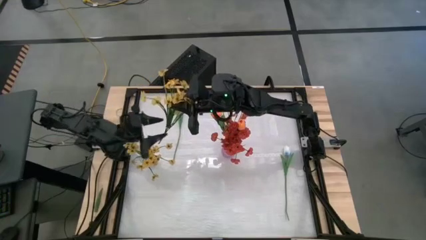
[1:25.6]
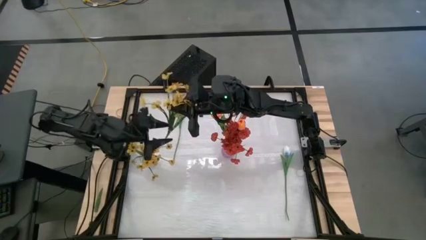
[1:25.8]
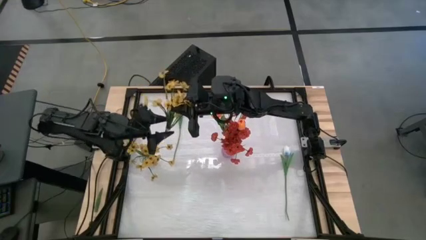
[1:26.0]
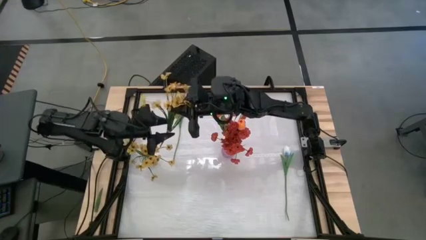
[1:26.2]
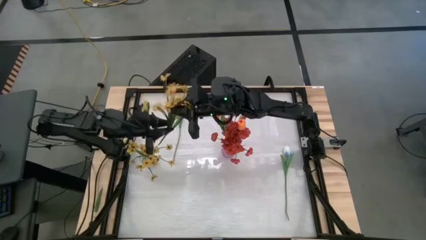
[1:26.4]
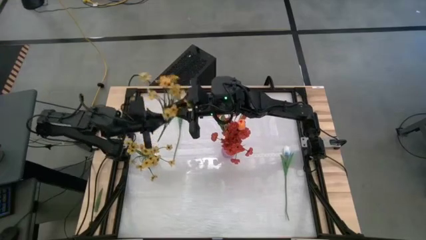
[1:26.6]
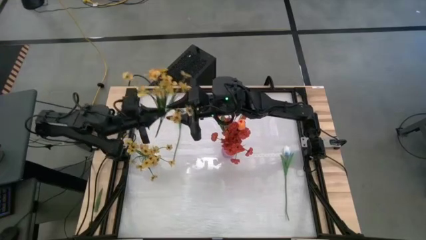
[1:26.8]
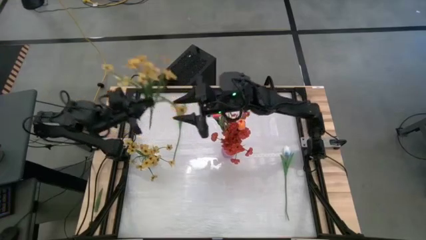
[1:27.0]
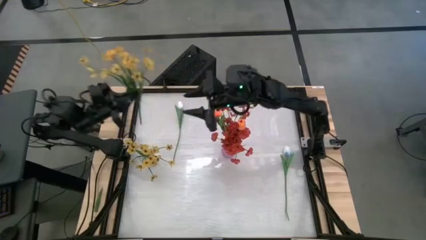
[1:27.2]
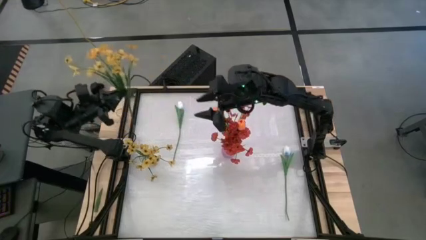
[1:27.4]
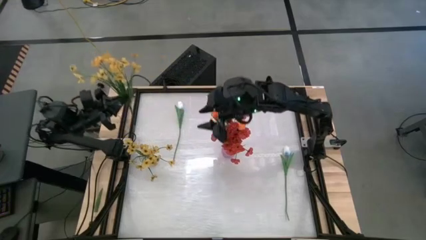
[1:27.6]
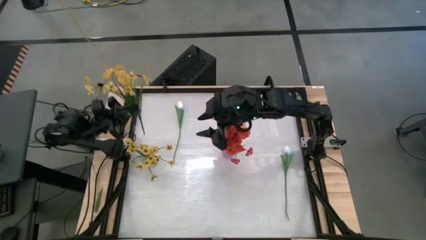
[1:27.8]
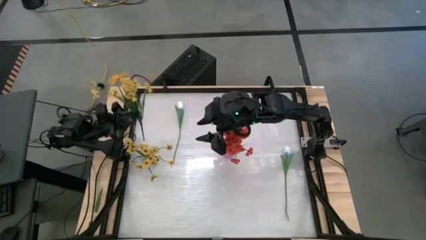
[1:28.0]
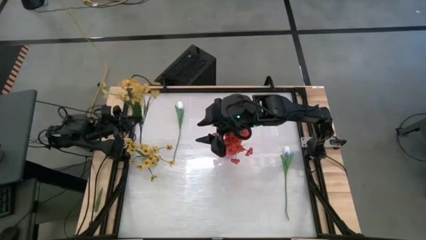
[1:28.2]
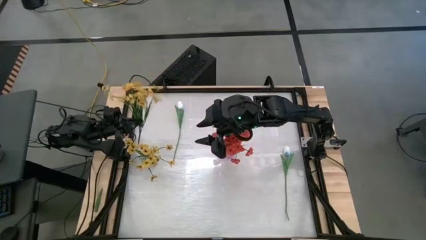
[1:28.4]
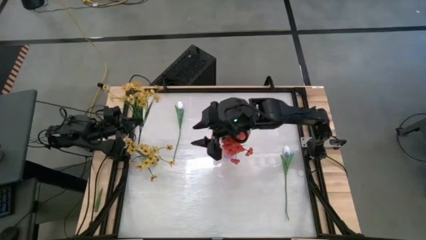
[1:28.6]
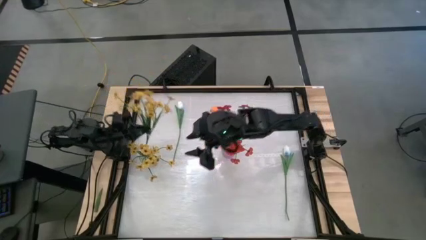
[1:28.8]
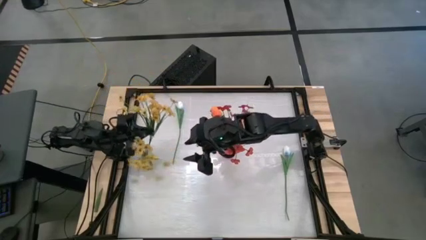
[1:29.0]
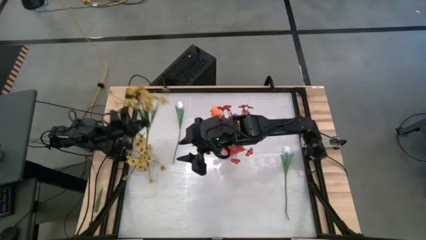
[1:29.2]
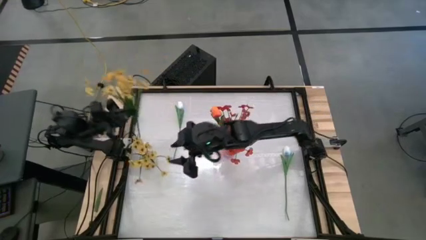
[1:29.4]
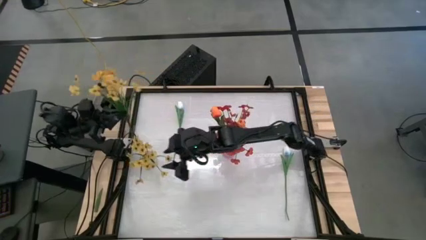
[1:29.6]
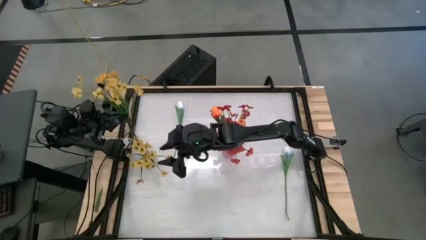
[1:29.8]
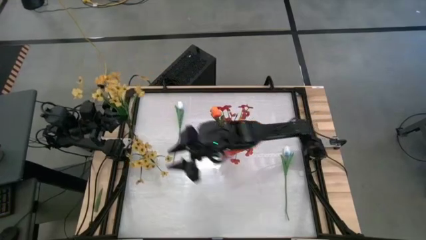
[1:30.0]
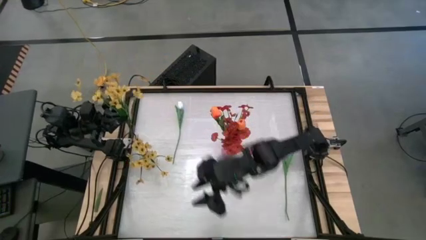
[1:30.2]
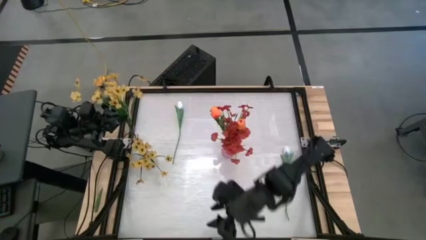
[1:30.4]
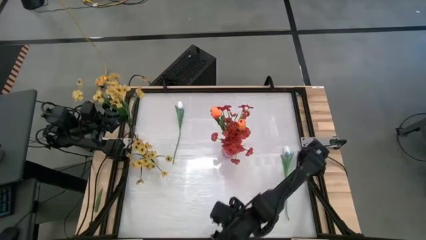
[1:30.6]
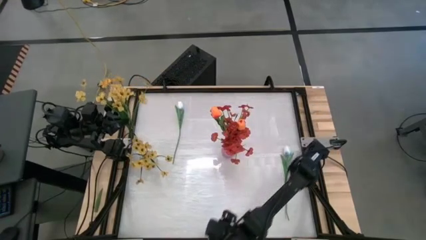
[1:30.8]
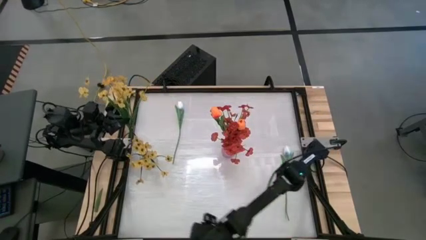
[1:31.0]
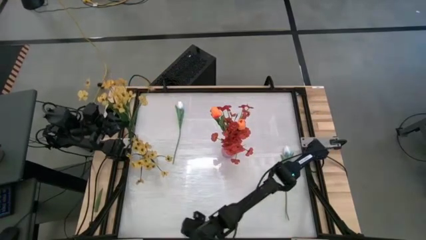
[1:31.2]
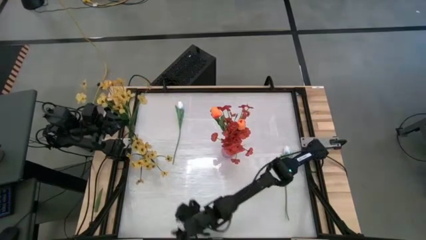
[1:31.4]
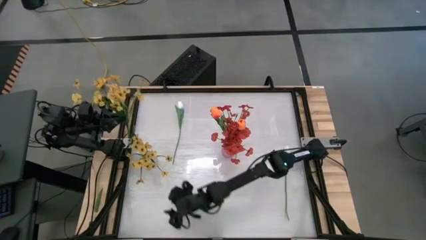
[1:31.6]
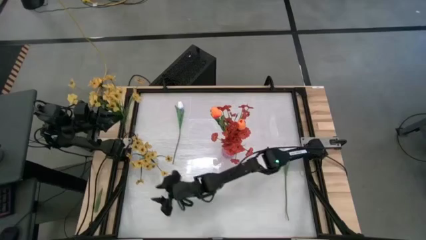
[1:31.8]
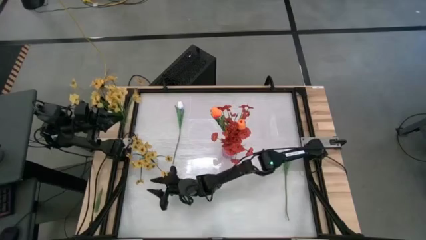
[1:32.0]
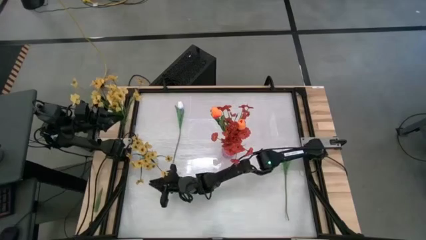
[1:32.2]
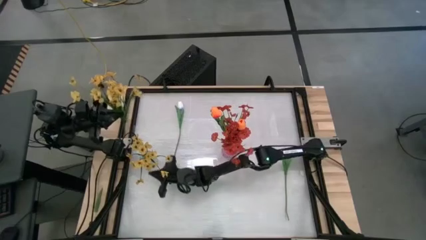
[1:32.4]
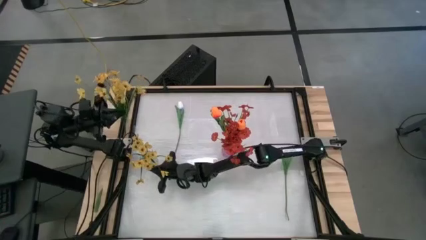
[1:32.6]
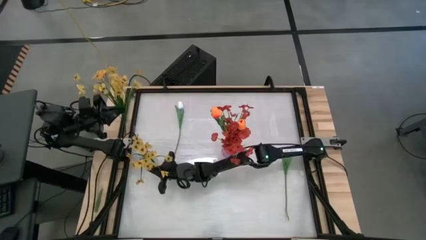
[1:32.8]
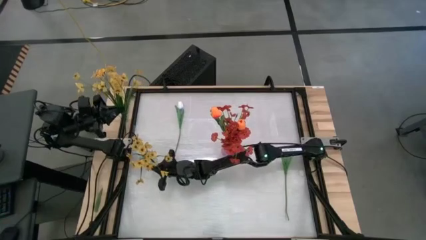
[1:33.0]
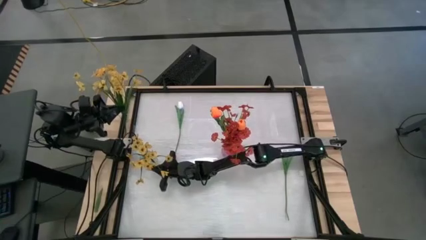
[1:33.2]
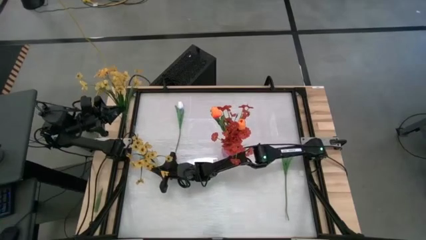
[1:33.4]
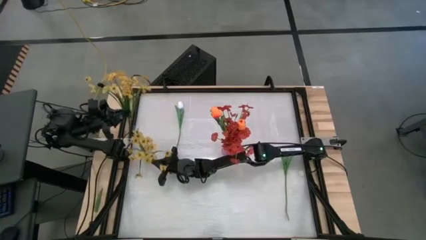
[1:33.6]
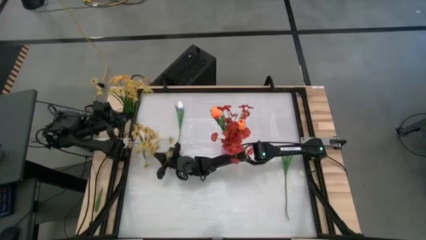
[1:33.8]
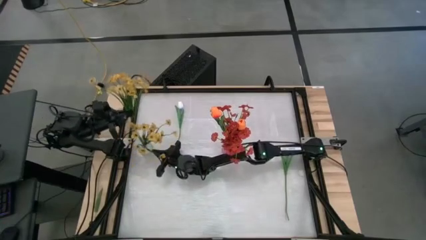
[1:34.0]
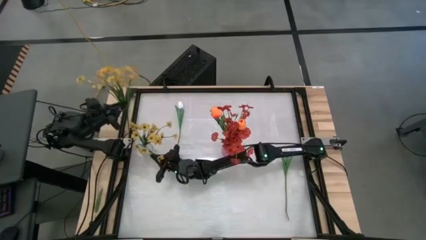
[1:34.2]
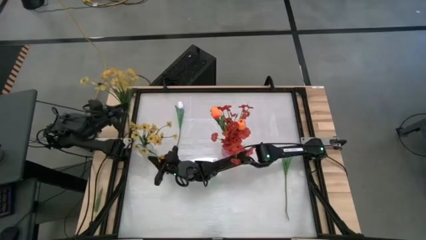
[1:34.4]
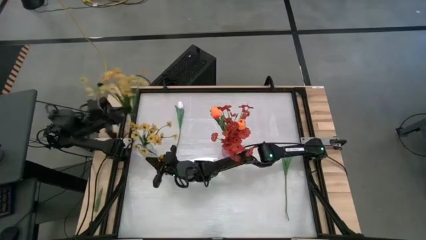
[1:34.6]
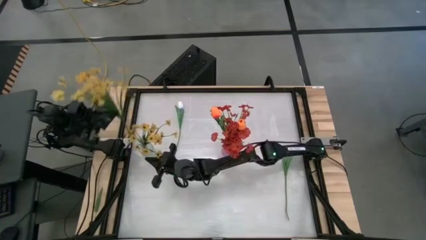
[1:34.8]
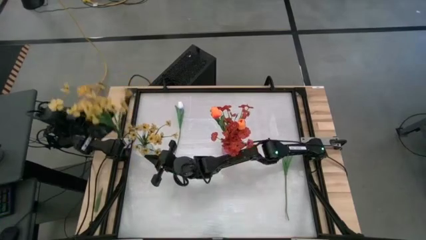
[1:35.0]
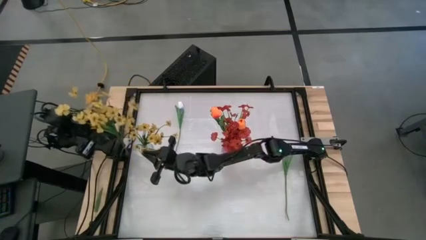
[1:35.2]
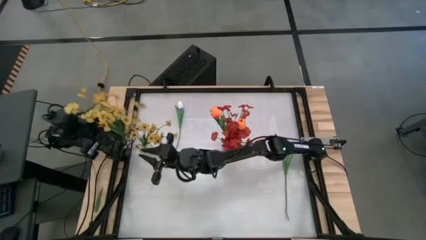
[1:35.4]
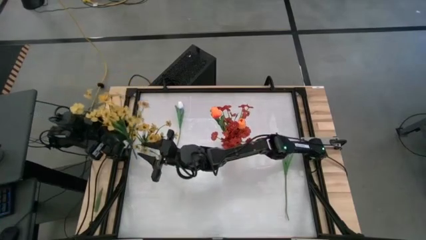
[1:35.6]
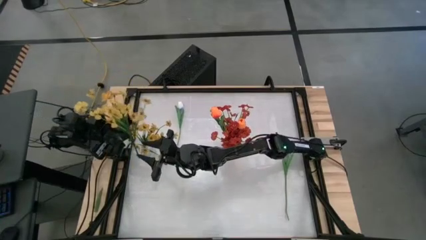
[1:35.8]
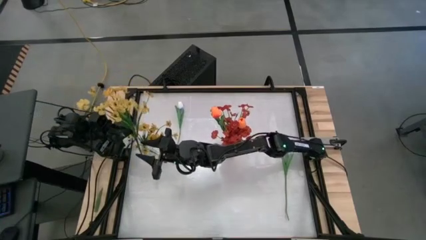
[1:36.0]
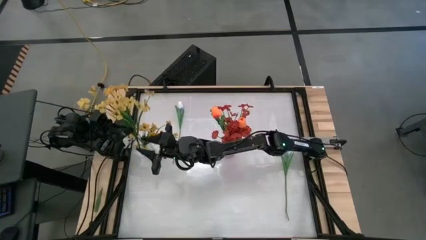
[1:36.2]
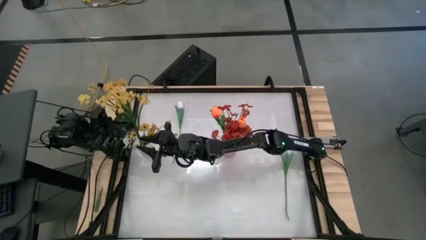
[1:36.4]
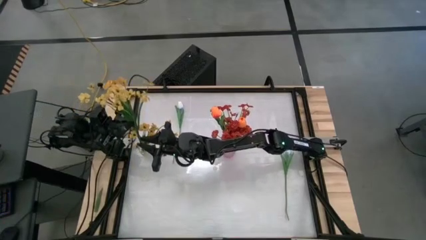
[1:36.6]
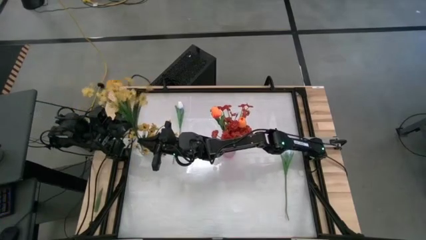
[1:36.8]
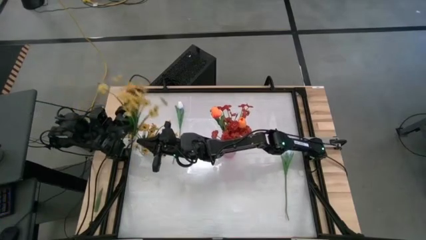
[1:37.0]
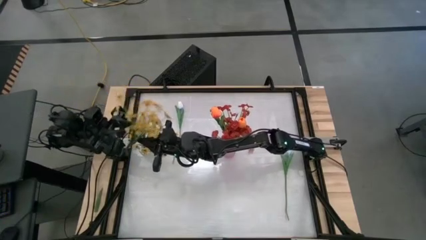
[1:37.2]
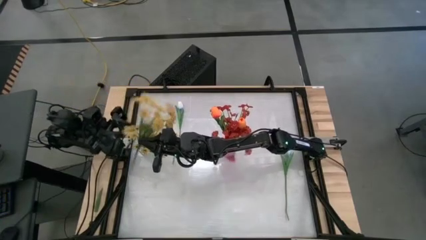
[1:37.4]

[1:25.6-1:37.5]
Task: Sort flowers into vase by color
Put the yellow flowers into the transparent vase

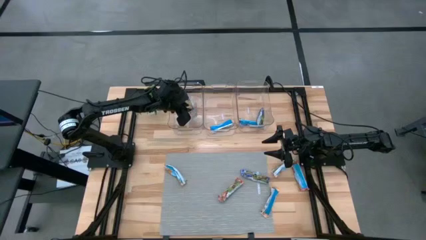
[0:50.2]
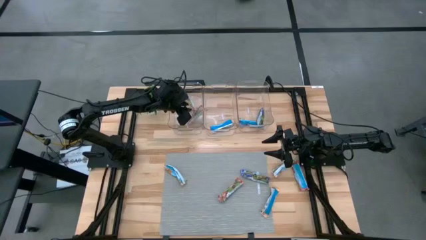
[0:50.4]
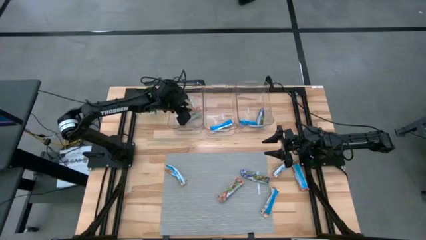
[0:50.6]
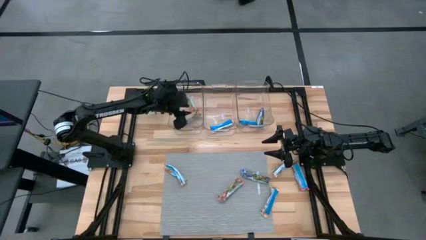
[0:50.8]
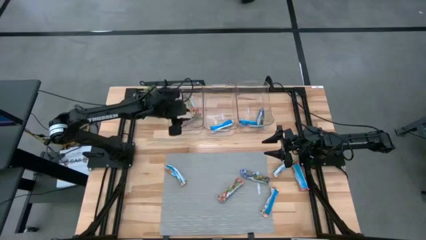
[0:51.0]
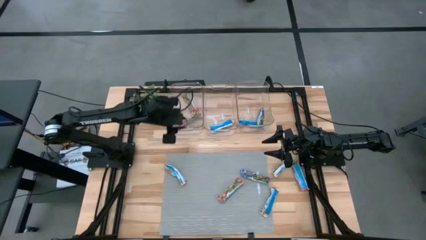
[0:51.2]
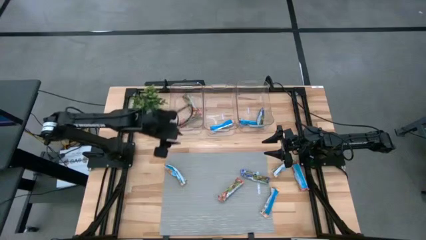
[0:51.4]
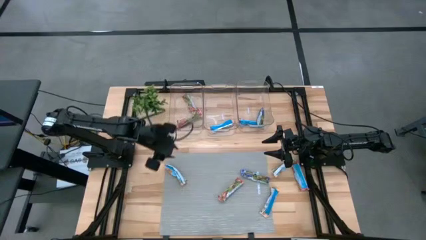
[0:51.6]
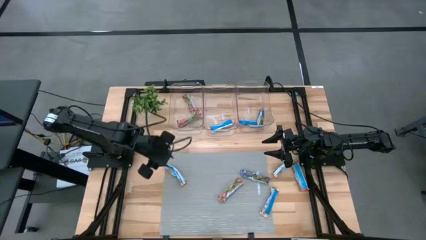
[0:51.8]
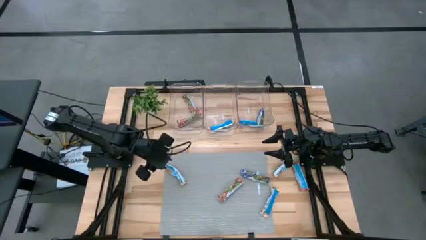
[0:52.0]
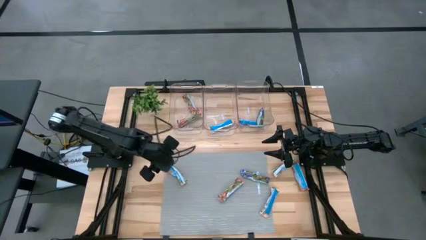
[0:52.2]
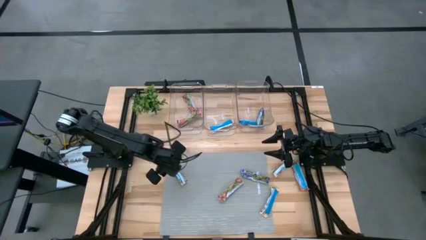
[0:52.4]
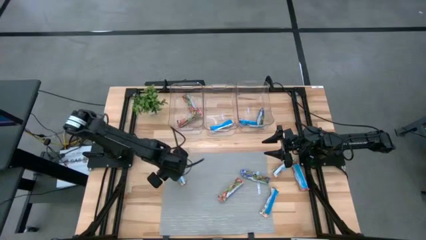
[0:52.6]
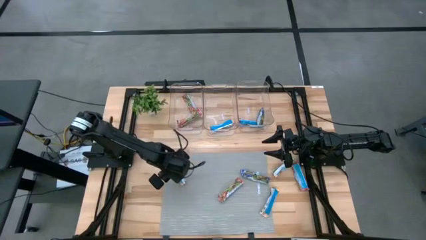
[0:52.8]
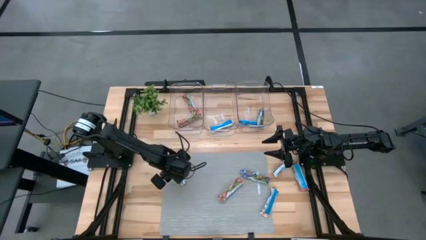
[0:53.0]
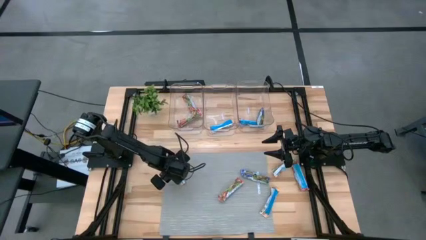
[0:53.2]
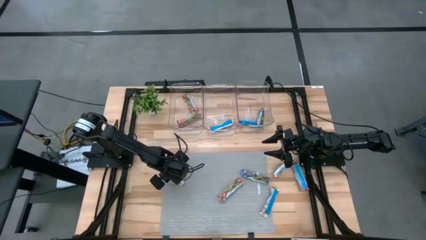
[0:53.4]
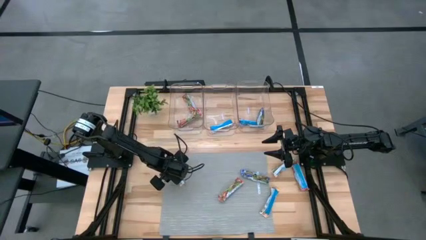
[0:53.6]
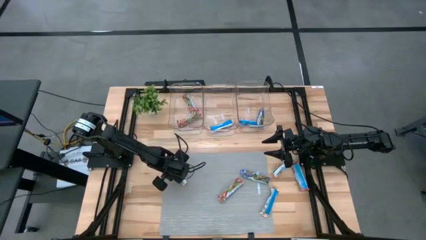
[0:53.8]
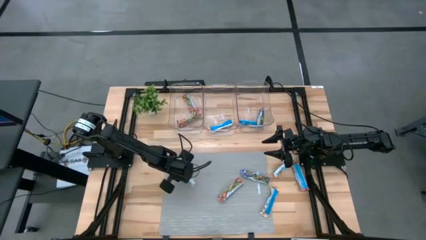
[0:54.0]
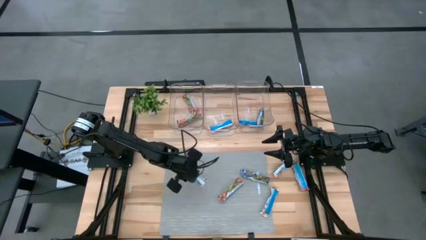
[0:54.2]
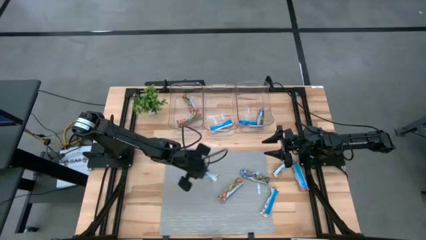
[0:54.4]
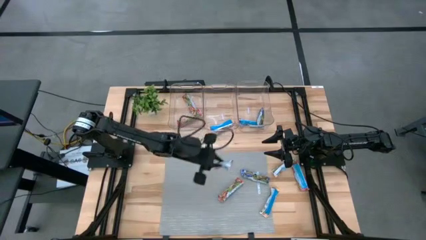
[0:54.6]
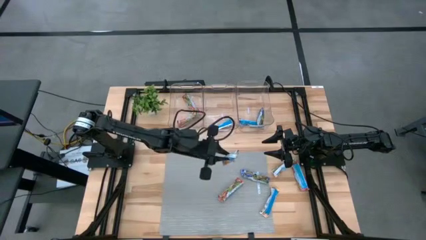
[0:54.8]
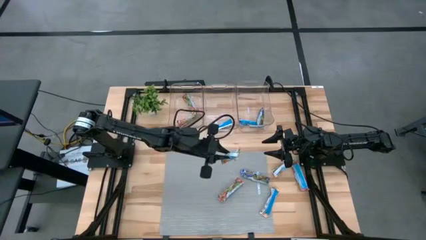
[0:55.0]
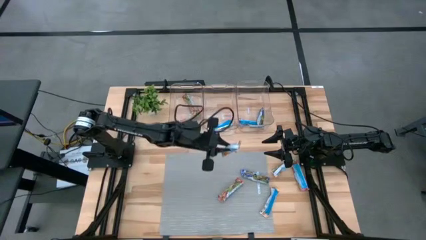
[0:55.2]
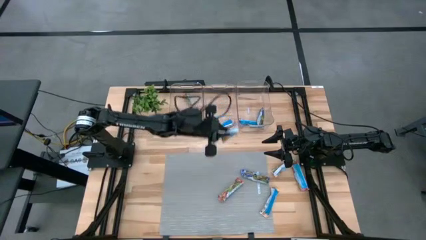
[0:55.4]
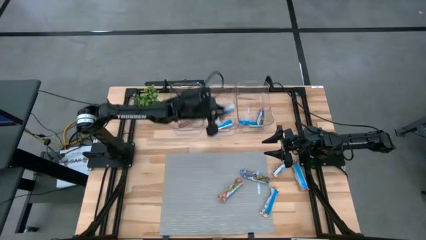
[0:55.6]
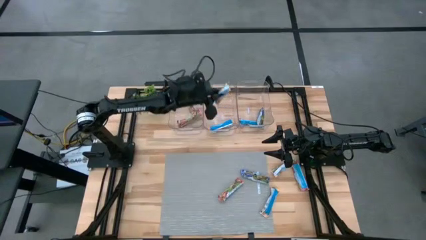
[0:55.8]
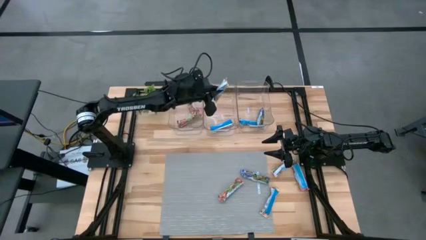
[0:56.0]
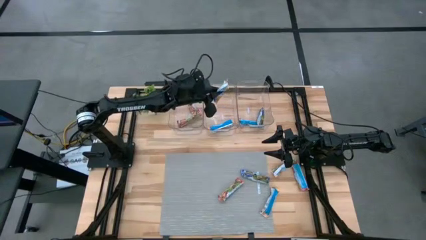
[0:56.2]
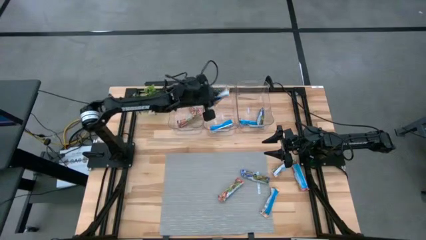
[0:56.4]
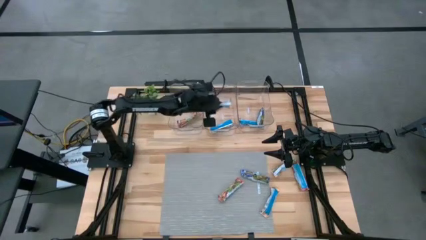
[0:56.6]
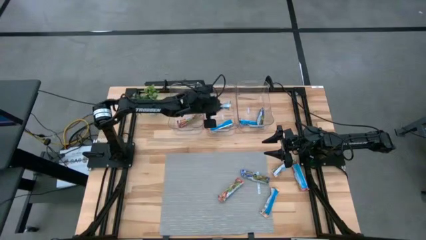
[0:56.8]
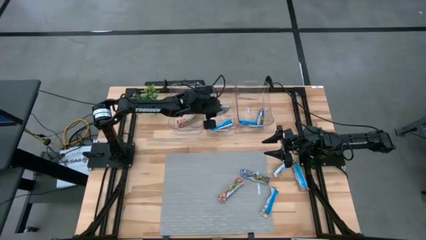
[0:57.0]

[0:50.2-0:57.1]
Task: Pick and place Granola Bars by type
Put the yellow granola bar into the middle transparent bin
